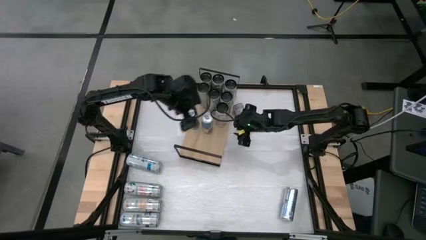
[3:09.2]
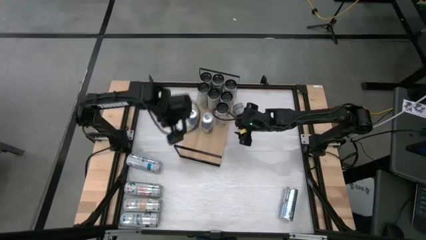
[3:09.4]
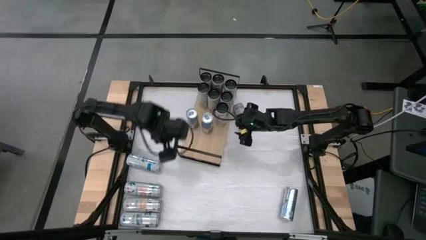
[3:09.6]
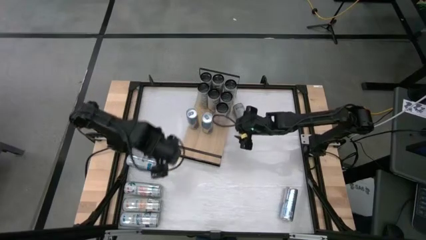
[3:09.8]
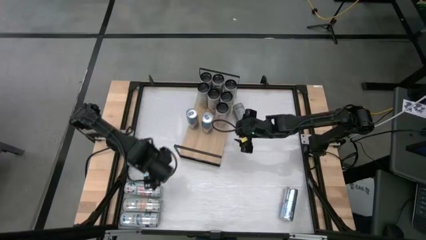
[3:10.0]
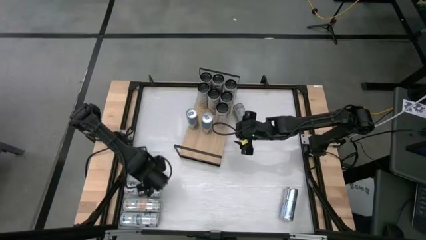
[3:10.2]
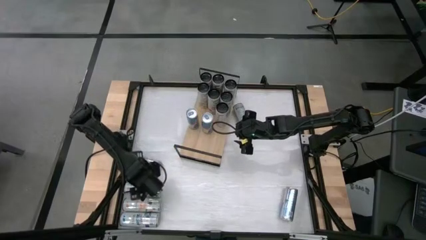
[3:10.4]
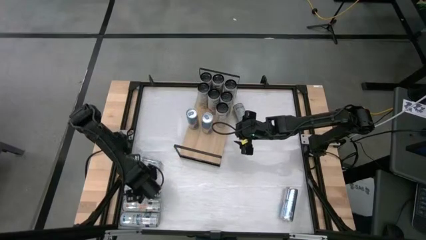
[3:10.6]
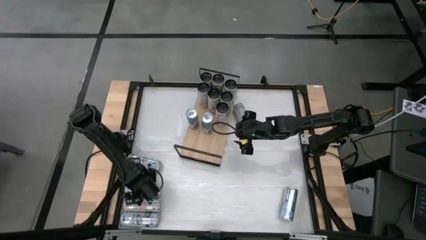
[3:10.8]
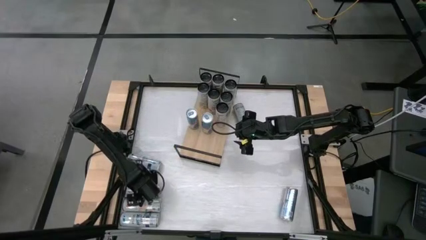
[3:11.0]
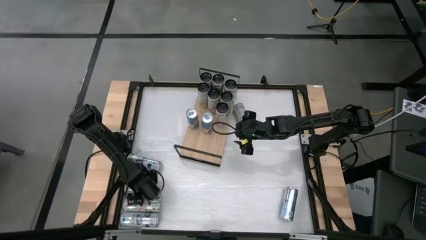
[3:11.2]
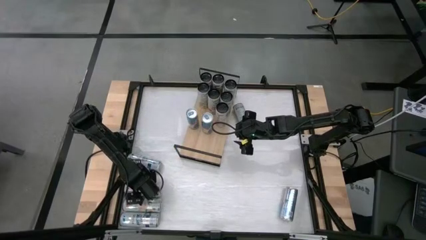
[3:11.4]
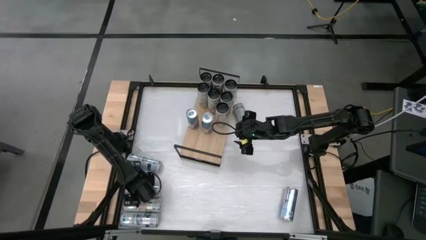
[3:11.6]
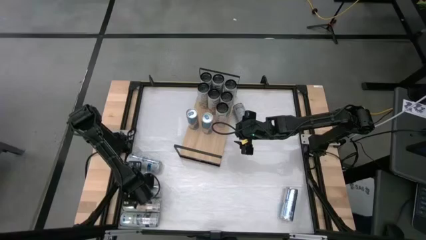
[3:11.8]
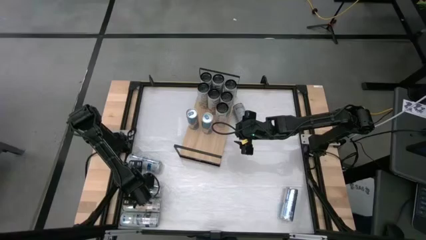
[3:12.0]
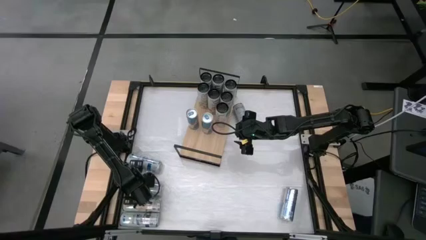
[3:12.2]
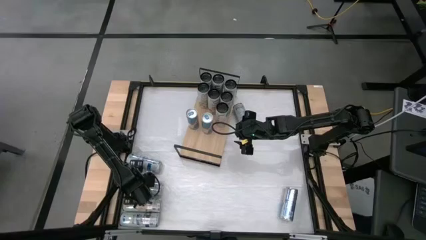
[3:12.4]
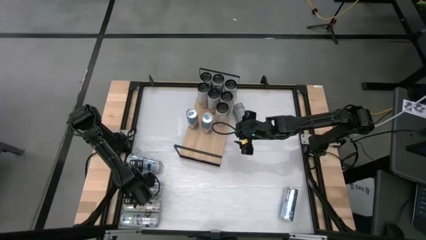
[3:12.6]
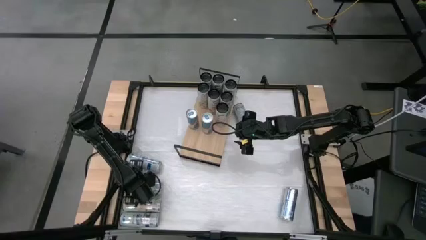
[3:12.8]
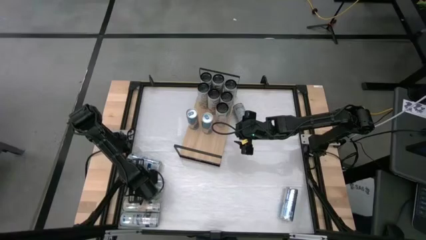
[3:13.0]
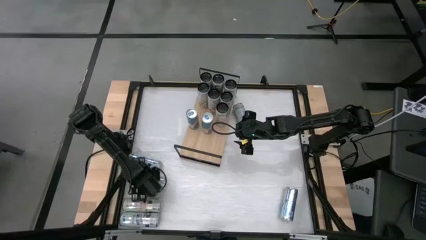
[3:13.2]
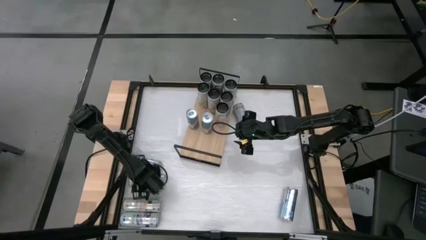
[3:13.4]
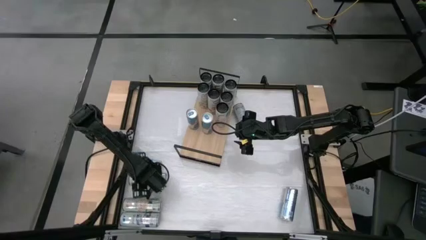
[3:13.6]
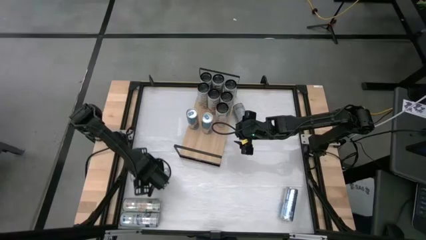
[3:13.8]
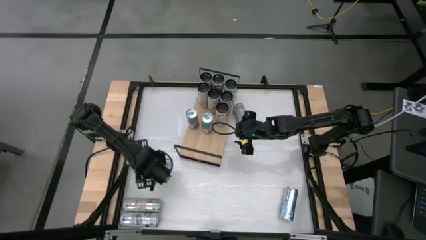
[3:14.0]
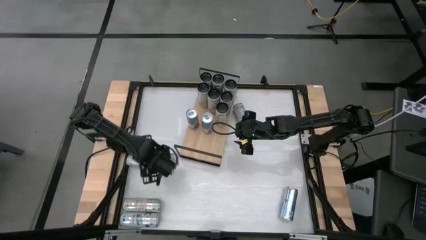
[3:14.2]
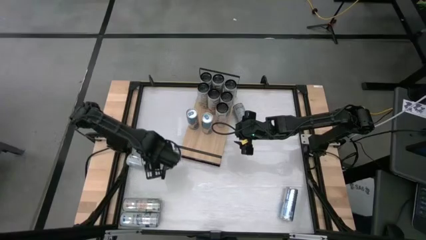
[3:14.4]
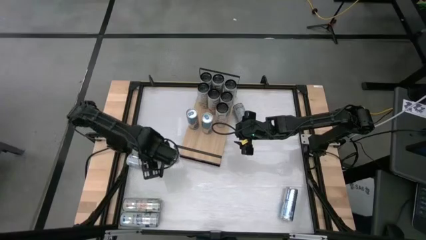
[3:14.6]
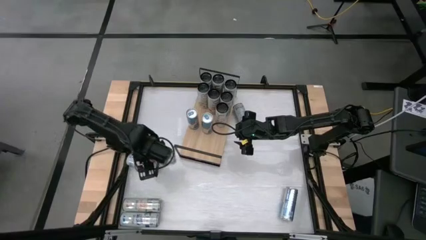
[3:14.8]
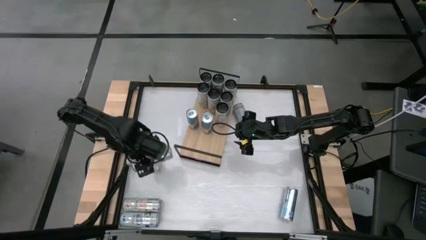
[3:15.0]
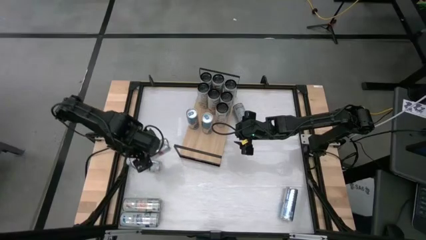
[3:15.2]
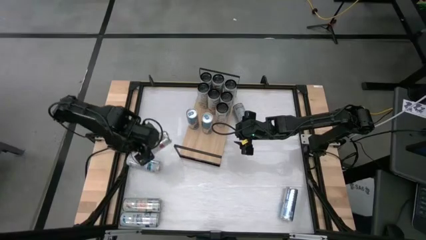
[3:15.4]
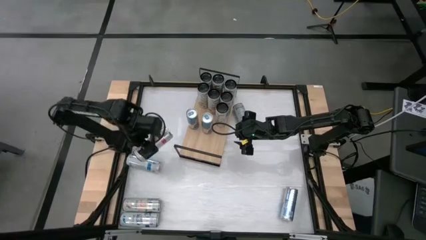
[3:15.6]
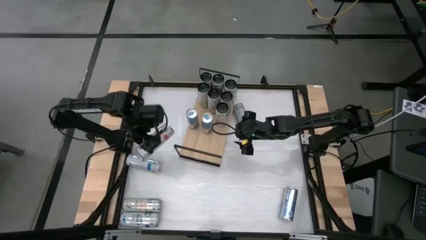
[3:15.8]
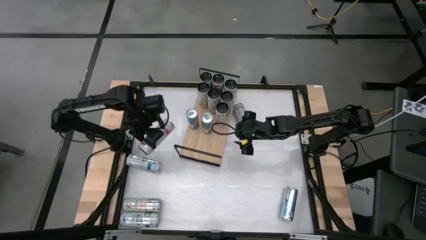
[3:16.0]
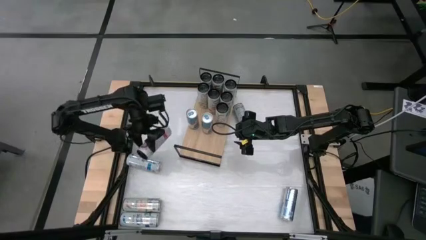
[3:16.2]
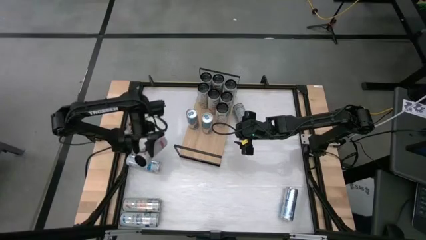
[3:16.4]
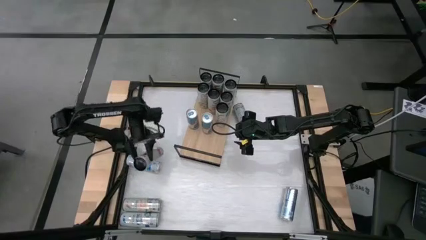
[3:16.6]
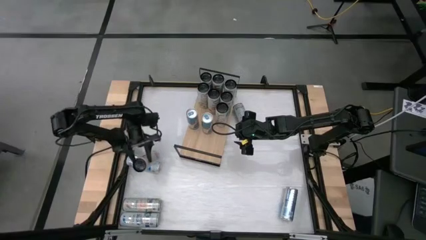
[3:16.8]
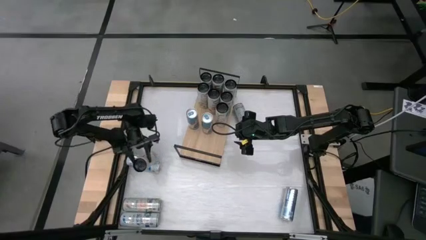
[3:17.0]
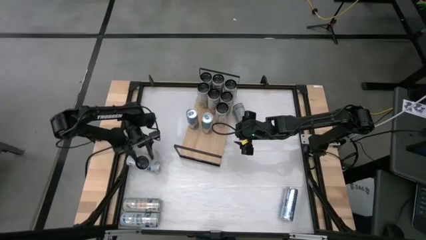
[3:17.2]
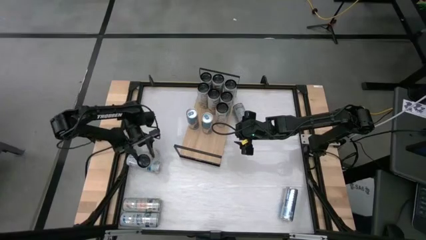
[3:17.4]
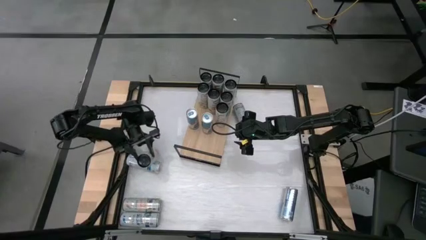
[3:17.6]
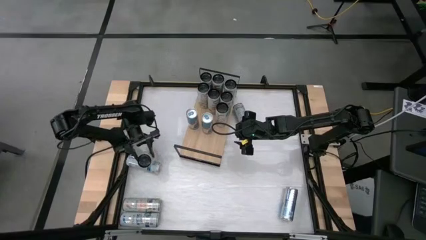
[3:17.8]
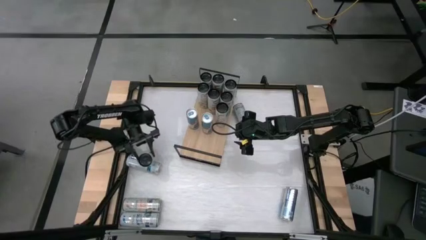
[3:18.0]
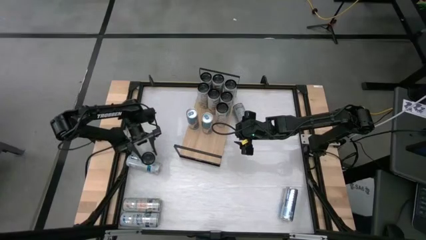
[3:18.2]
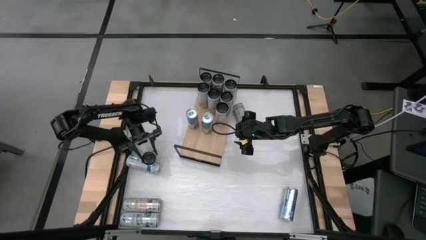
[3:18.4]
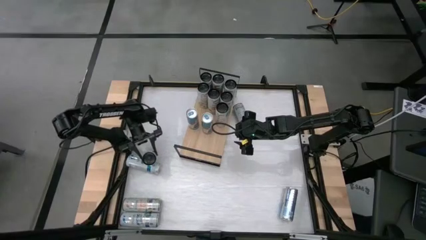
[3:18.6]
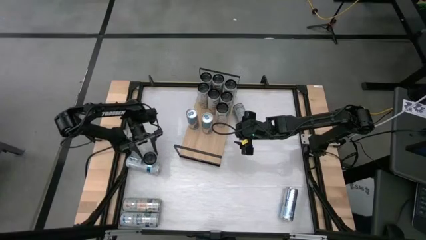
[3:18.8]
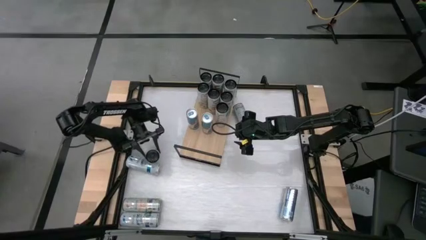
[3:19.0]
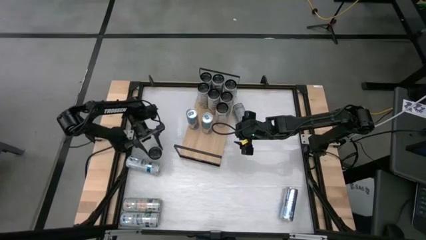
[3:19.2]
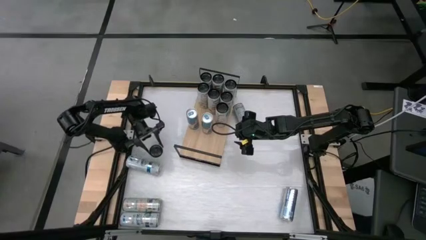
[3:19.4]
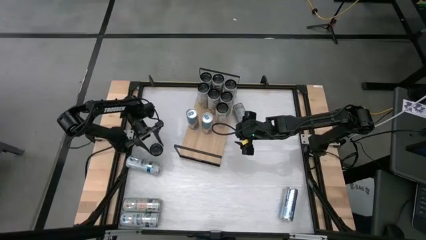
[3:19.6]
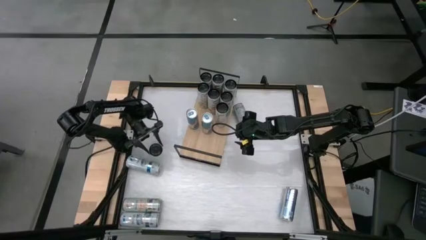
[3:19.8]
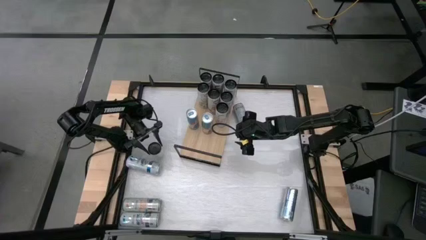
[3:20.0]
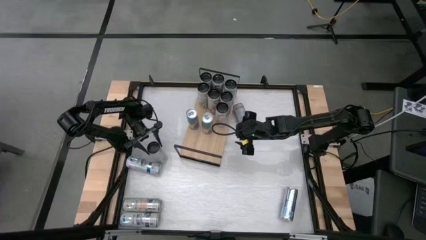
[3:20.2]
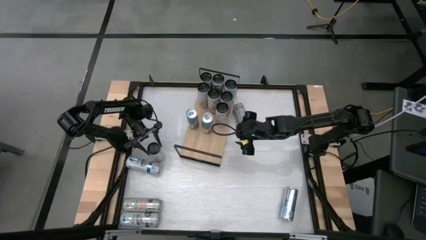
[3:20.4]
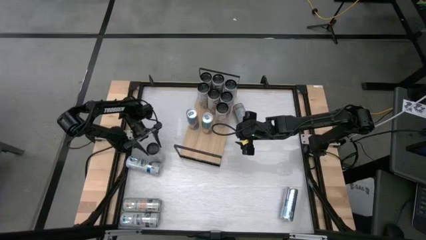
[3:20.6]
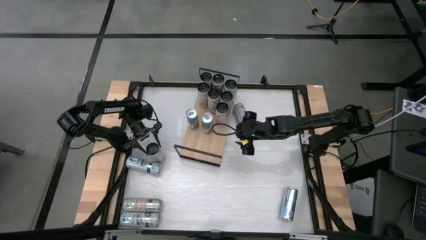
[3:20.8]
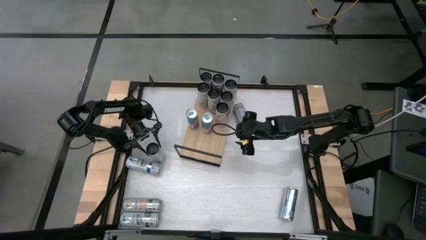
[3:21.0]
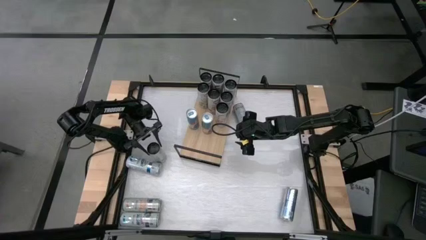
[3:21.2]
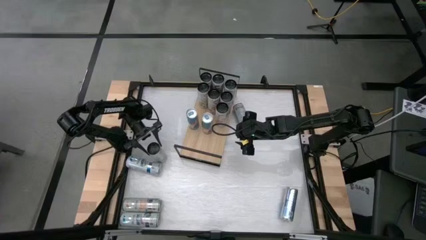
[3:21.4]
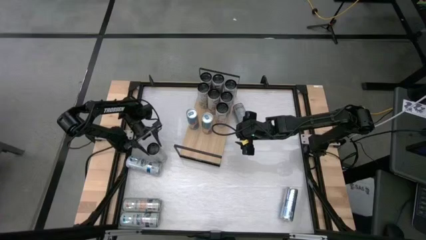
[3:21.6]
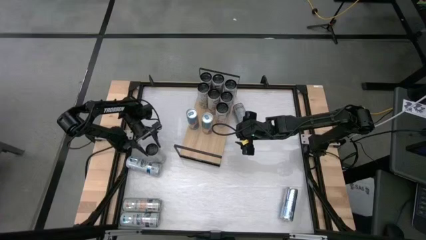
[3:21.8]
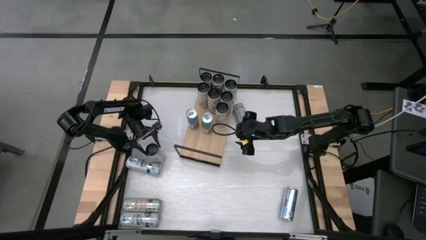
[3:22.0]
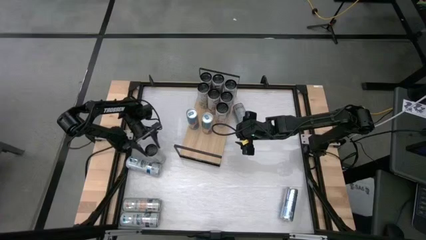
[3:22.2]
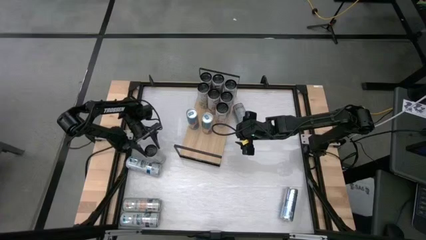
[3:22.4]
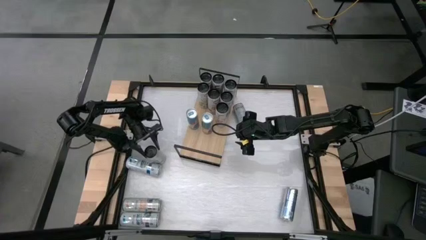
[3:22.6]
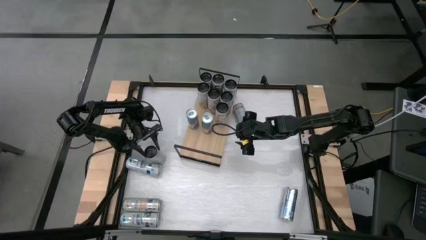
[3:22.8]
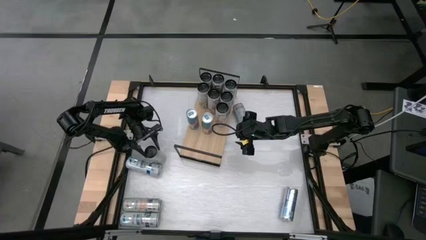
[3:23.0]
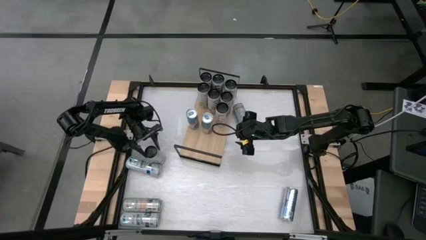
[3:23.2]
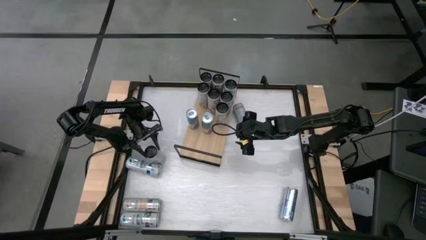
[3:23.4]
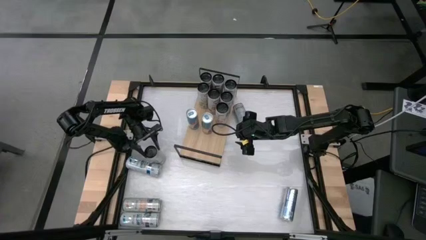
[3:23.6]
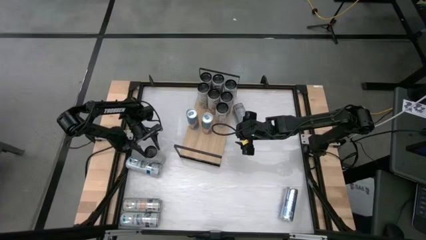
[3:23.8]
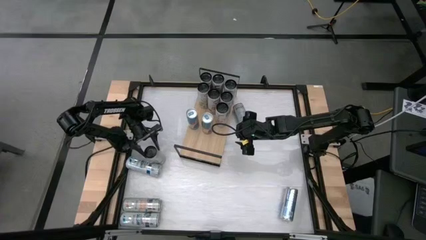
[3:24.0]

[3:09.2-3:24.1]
Task: Place canned beverage on shelf
Put the bottom left pink soda can on the shelf aligned with the other pink soda can

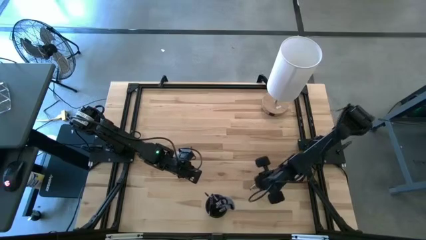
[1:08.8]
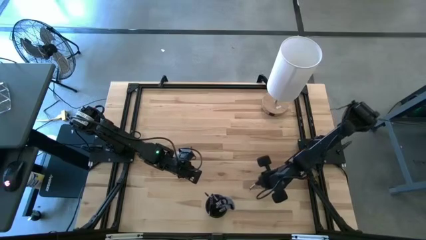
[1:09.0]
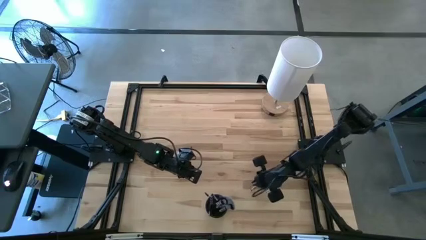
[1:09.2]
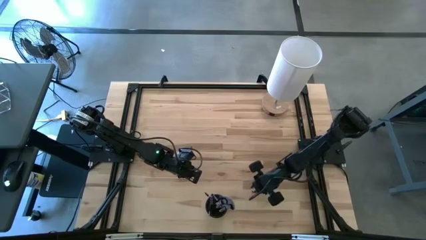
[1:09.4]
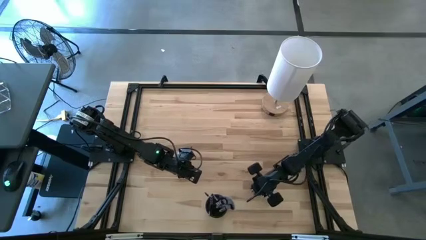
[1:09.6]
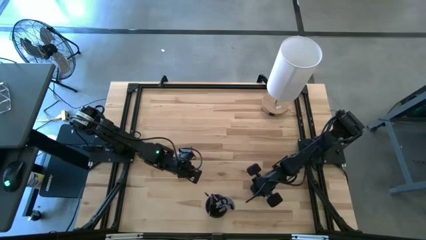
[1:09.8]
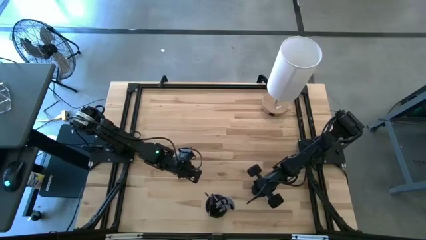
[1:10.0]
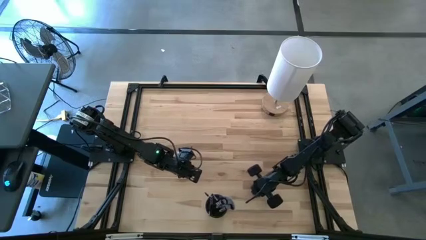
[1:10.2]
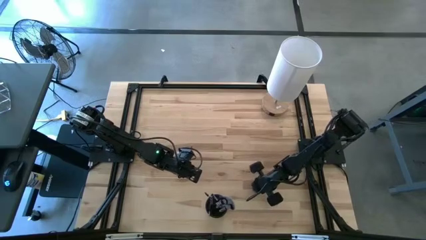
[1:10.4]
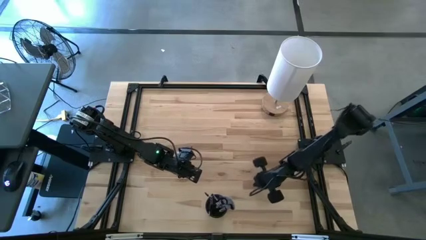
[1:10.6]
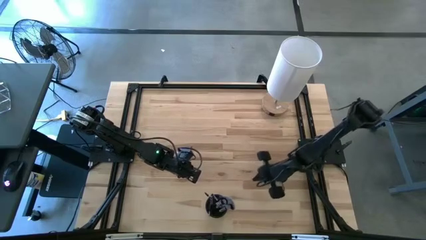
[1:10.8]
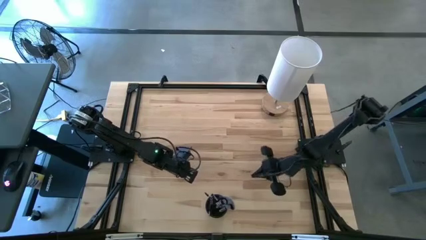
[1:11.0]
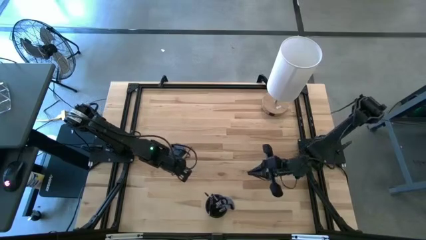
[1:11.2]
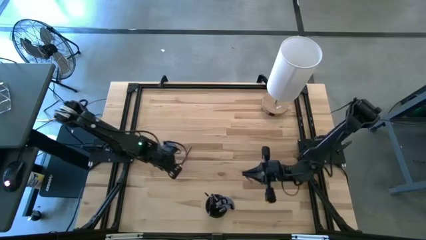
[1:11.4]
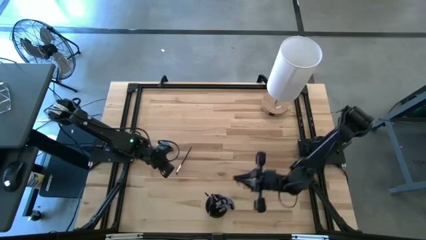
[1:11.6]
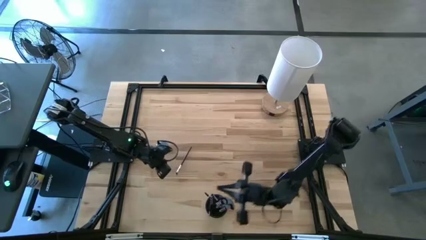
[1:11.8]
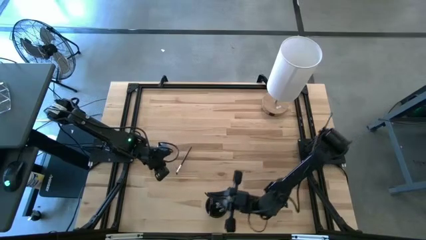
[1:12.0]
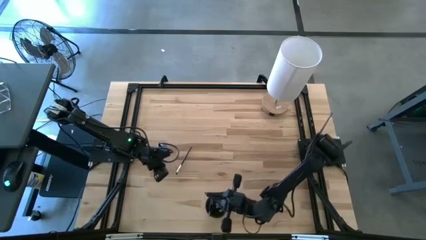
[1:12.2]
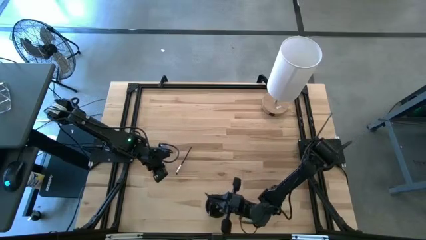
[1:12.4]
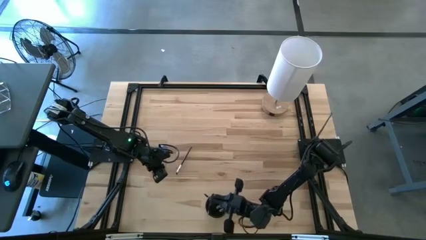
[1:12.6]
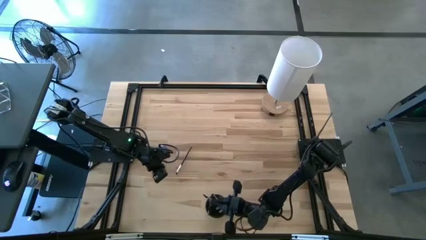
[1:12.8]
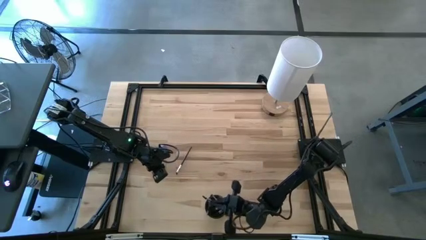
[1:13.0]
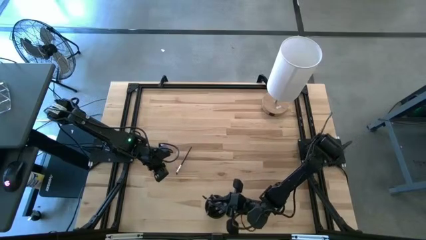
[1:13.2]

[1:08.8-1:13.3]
Task: Put items in baskets/containers
Put the black eyeshadow brush into the black pen holder
